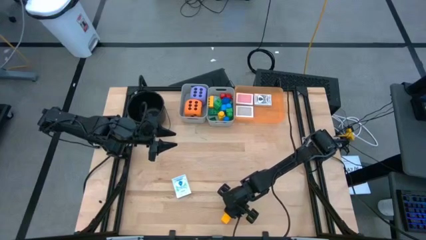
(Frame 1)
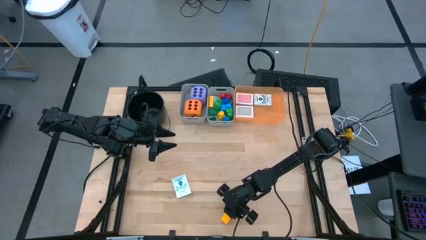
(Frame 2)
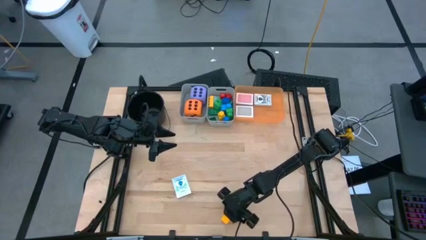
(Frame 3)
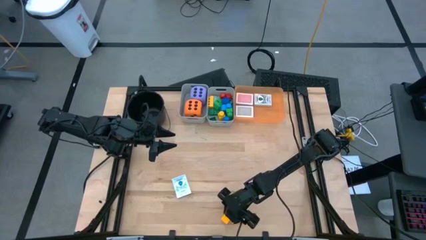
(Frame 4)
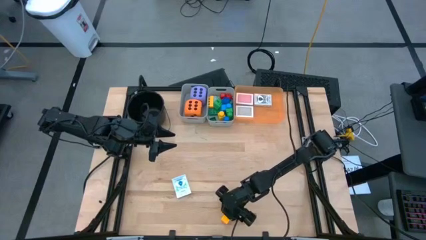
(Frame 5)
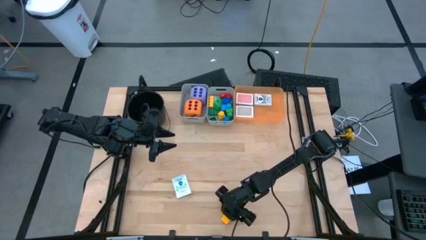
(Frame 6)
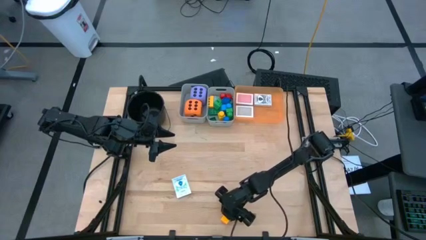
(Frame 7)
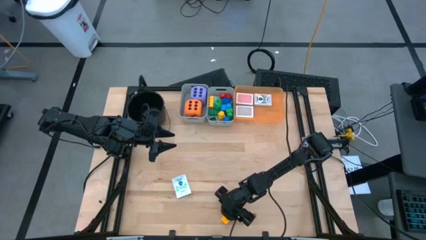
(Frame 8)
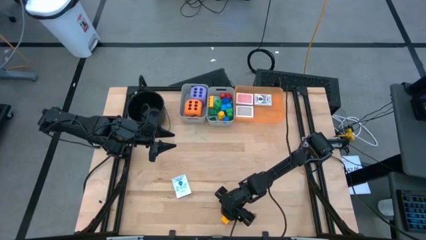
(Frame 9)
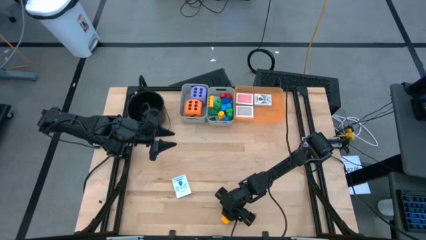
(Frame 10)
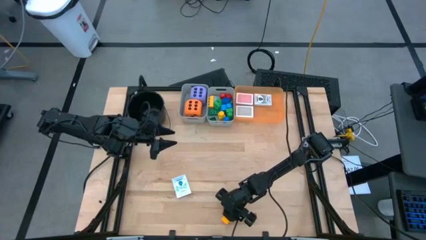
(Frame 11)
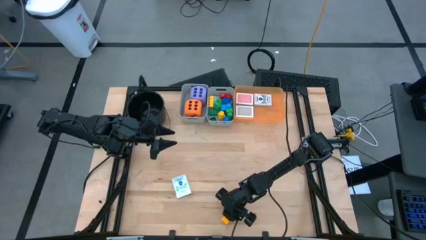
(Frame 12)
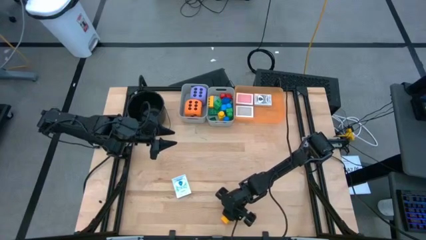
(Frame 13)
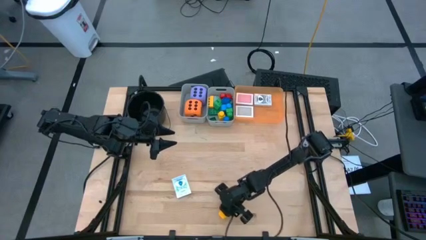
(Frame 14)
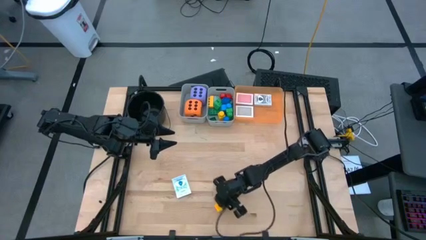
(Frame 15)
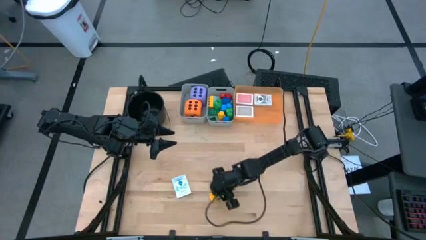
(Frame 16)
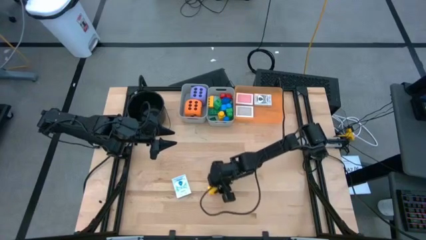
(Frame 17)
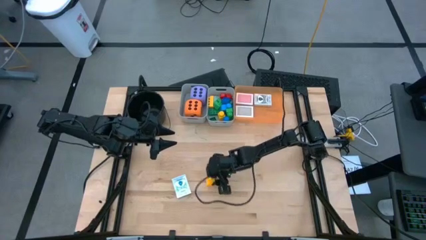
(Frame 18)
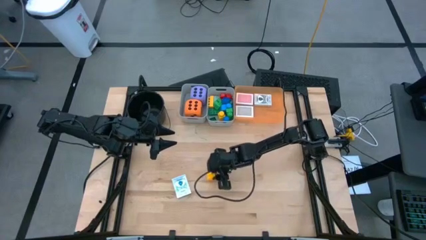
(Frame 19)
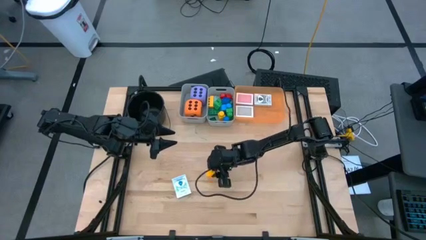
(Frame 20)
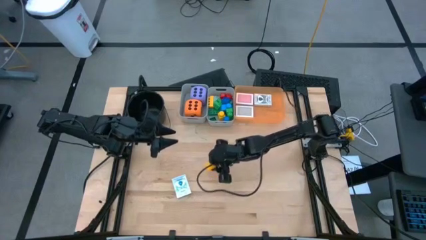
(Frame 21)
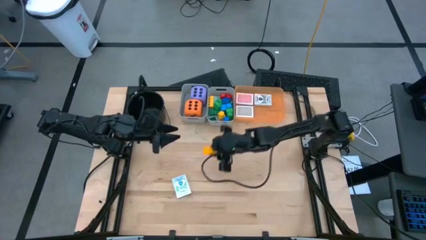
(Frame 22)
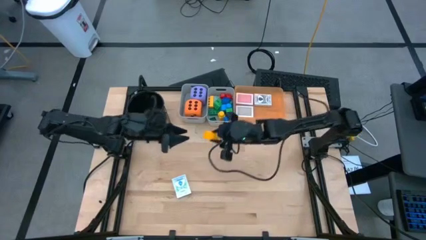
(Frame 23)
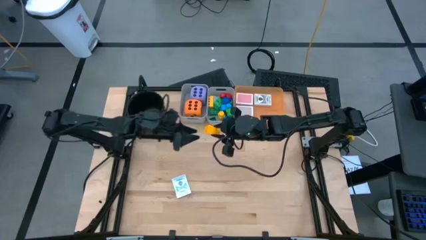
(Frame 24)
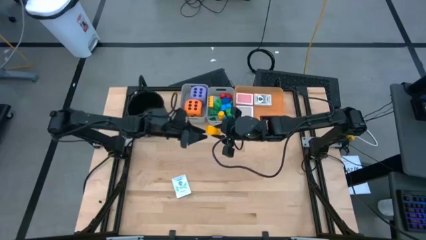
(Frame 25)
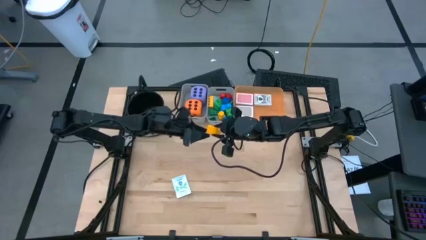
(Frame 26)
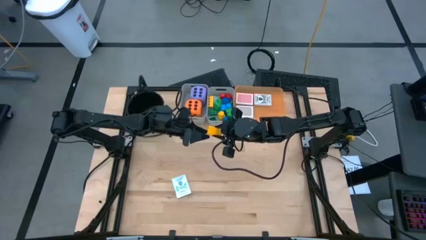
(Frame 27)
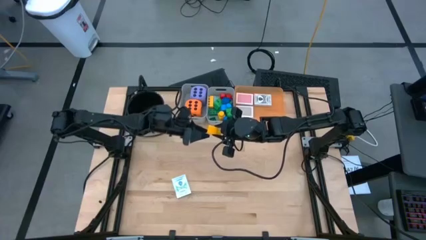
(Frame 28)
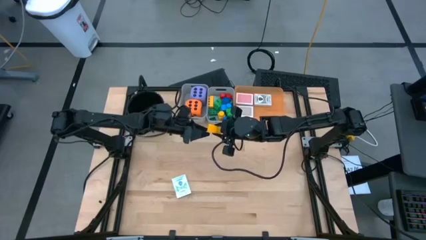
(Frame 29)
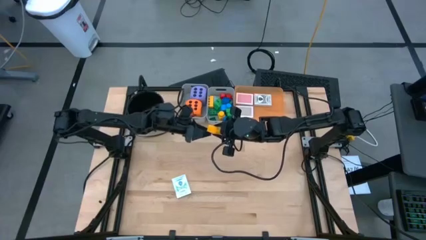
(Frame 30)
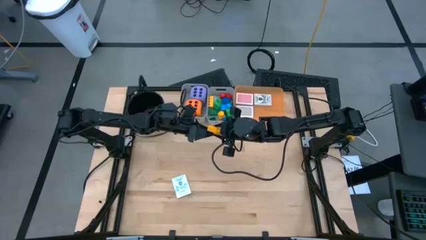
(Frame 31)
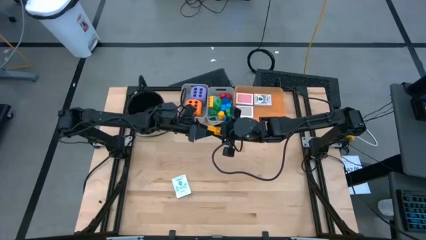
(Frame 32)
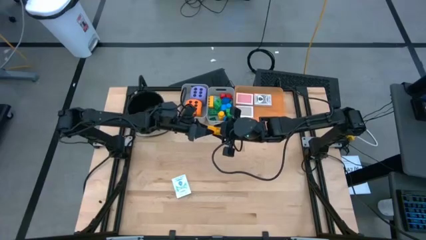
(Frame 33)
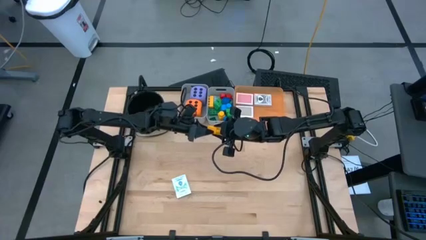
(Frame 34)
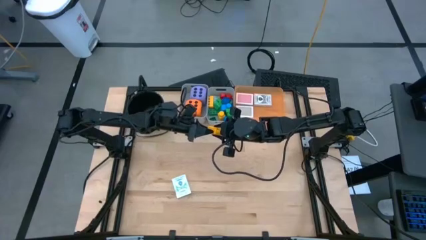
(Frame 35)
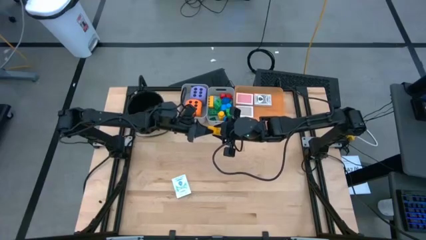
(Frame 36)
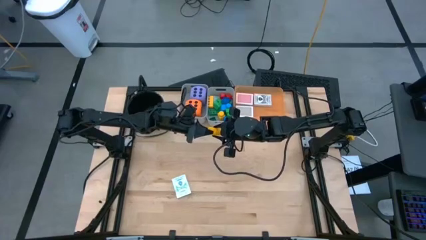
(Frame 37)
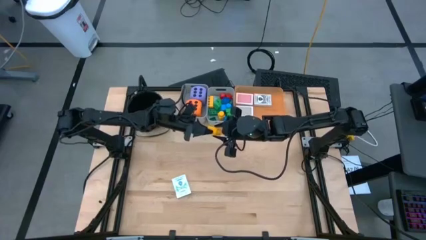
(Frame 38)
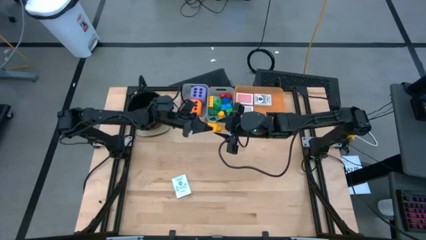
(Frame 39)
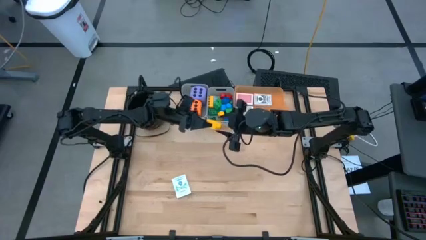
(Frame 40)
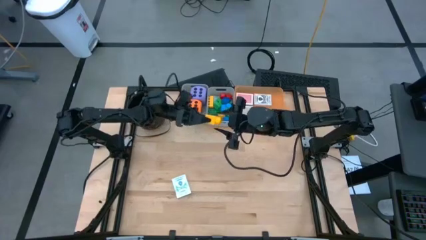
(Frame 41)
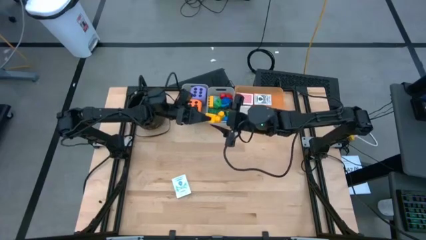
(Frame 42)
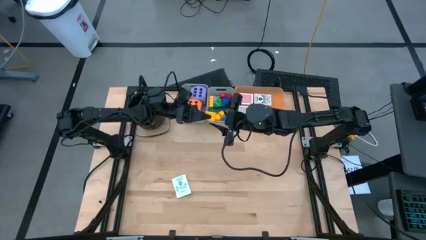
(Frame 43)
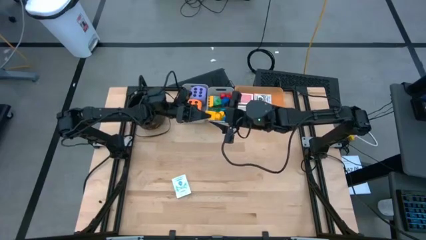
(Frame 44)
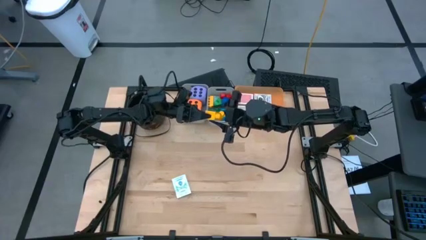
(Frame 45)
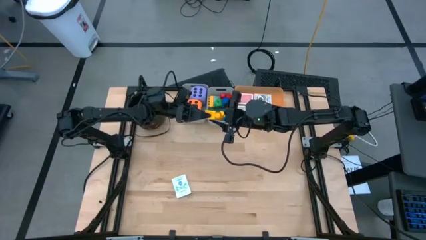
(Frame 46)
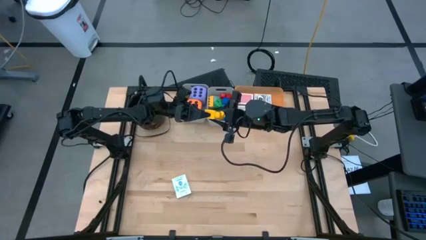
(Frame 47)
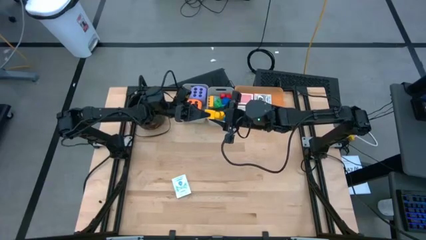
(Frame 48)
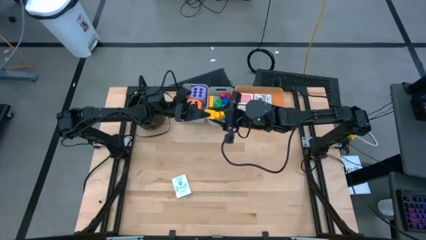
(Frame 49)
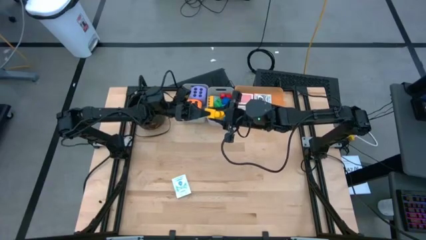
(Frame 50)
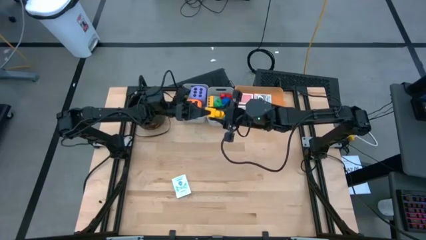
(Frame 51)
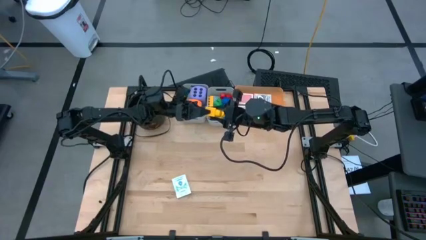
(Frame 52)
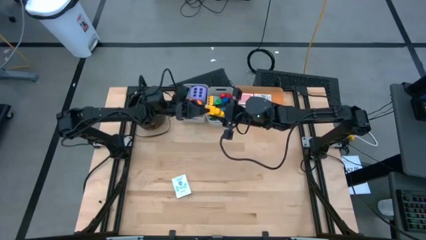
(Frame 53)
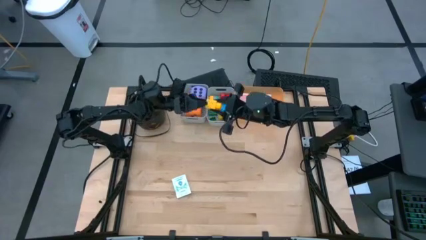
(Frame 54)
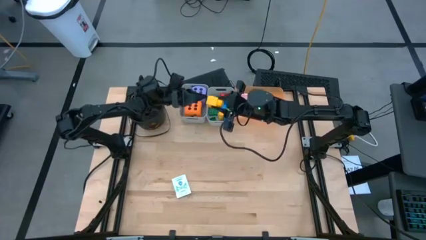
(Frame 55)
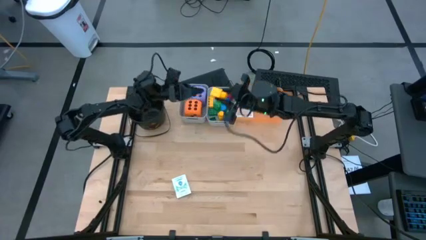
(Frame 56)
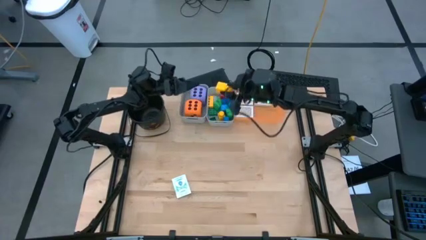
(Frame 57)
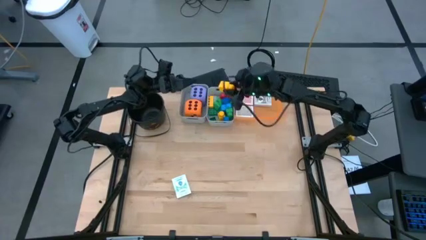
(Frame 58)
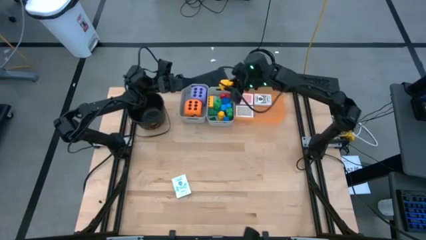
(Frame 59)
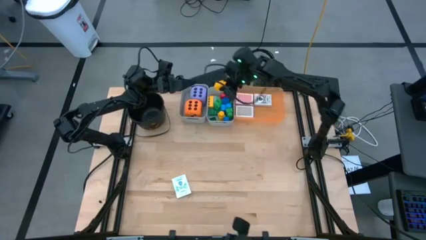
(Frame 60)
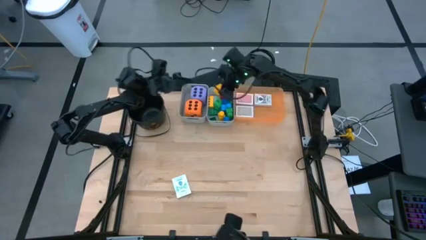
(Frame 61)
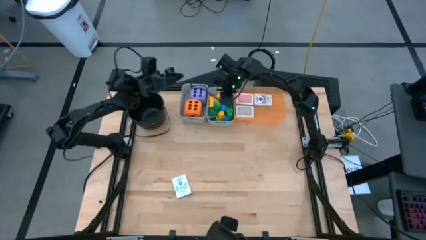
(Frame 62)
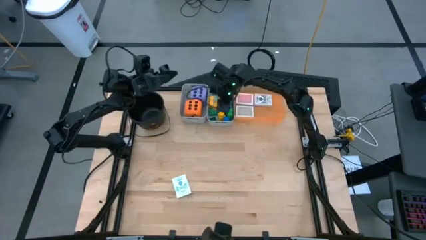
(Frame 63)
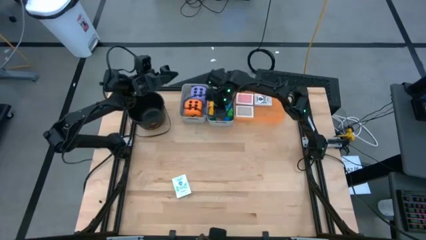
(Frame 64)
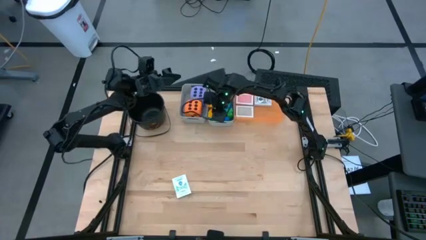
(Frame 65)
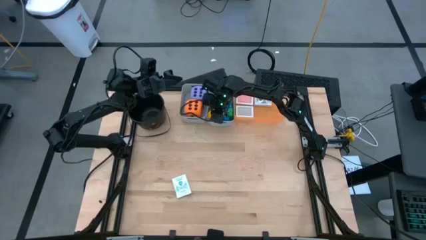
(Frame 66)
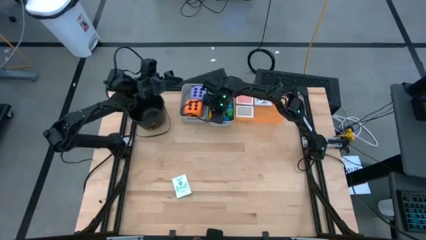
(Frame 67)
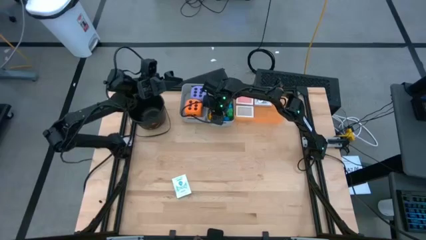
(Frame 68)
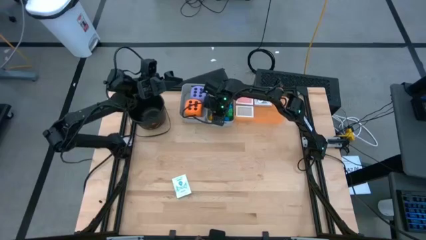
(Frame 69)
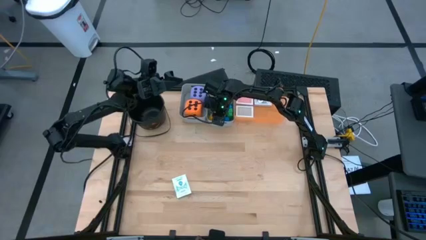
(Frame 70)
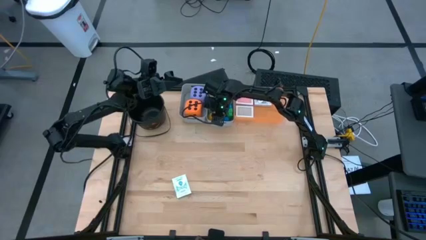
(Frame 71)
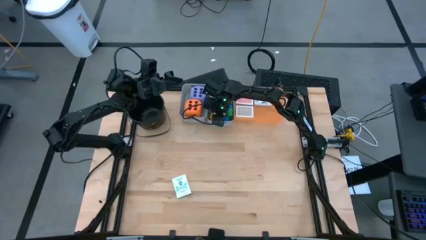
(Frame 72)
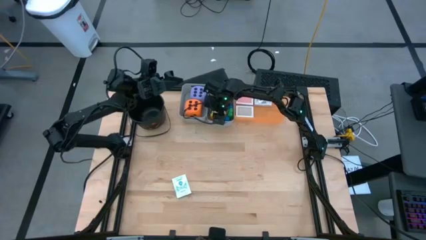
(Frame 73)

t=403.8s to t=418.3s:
Task: Pick & Place Toys
Put the yellow gamepiece into the right gray bin
